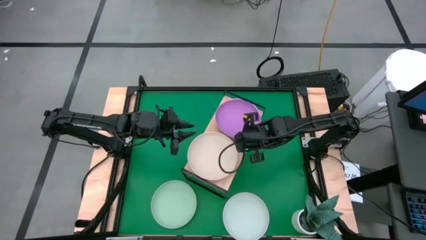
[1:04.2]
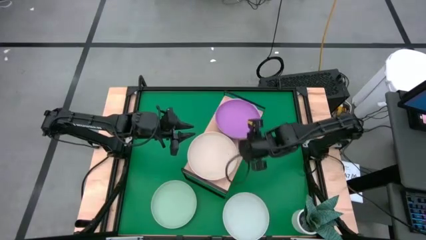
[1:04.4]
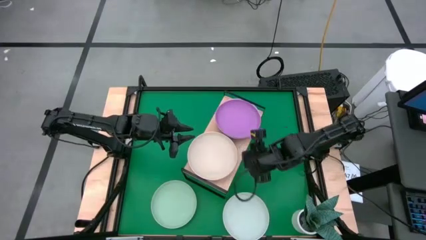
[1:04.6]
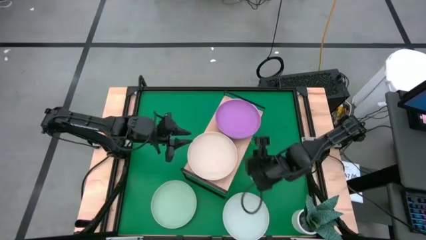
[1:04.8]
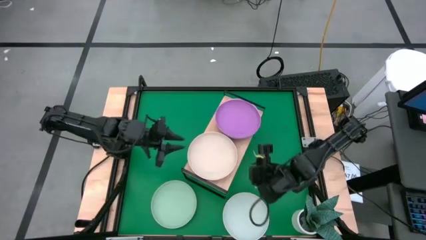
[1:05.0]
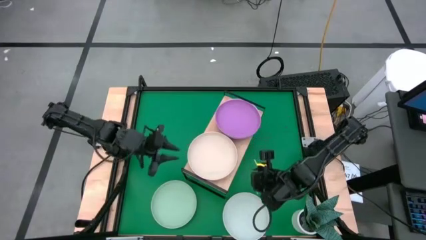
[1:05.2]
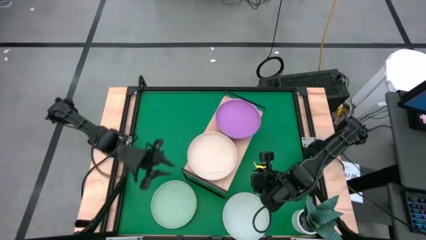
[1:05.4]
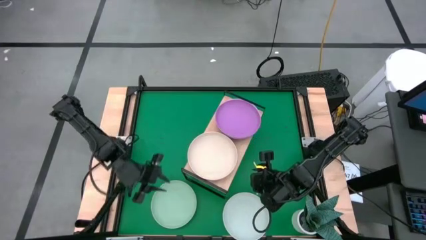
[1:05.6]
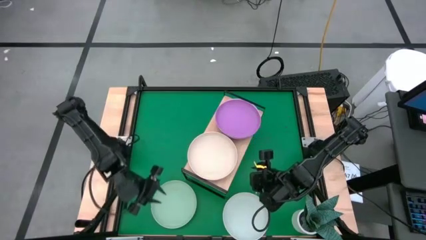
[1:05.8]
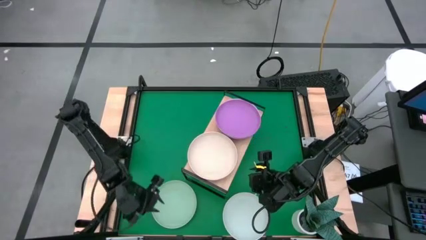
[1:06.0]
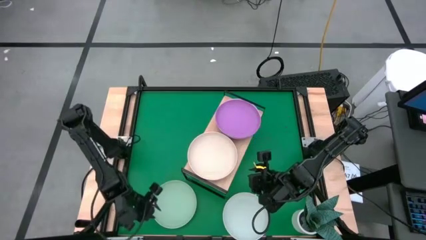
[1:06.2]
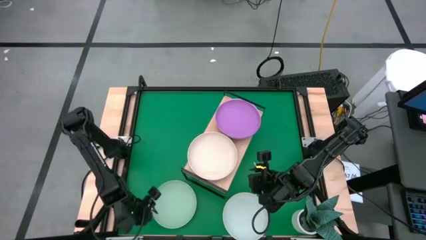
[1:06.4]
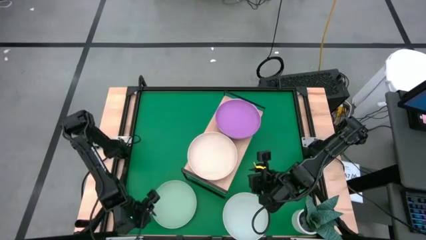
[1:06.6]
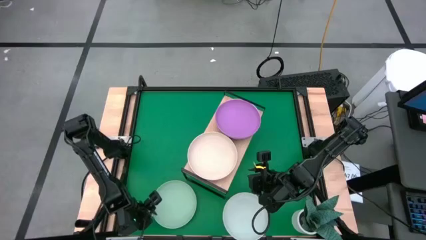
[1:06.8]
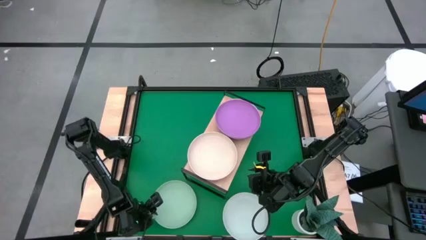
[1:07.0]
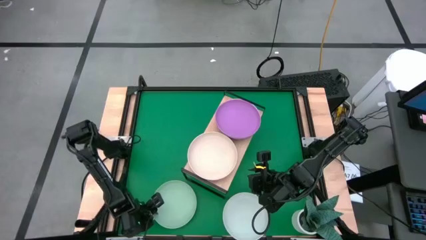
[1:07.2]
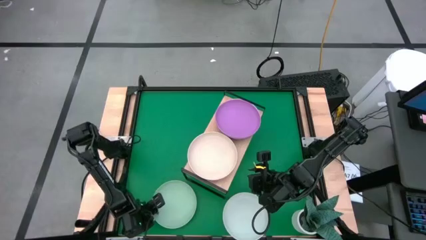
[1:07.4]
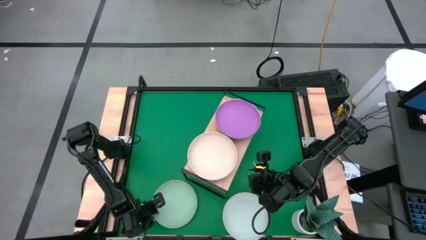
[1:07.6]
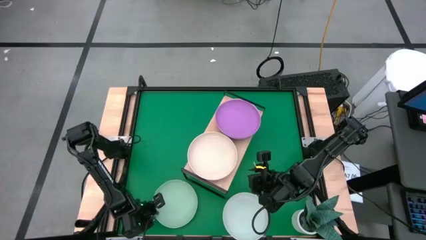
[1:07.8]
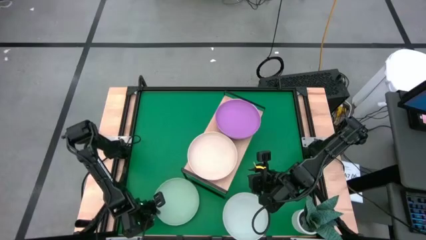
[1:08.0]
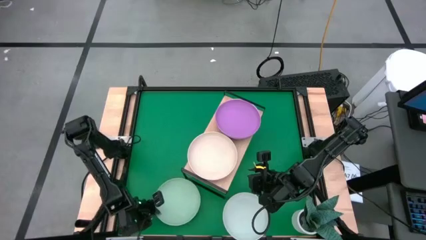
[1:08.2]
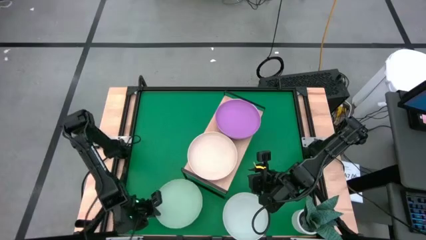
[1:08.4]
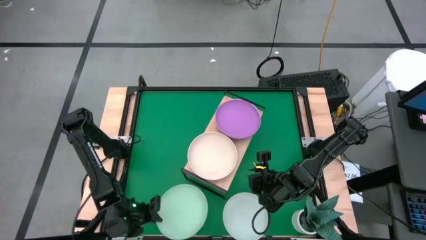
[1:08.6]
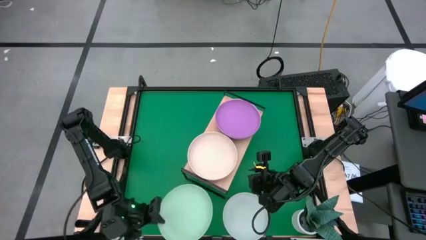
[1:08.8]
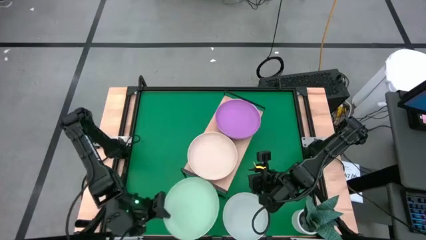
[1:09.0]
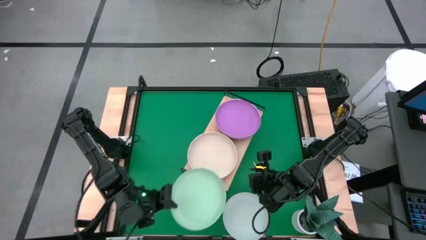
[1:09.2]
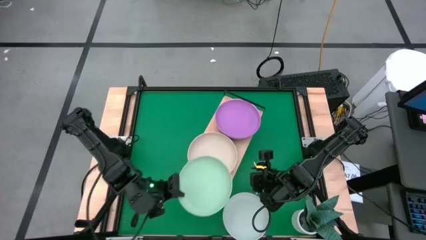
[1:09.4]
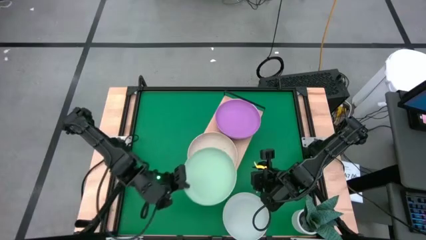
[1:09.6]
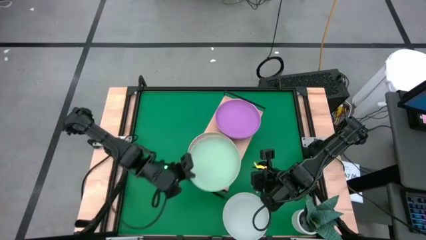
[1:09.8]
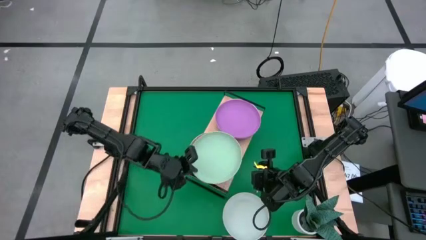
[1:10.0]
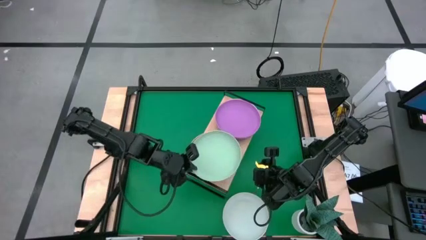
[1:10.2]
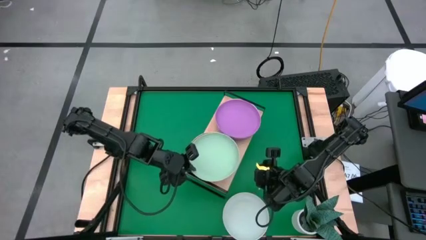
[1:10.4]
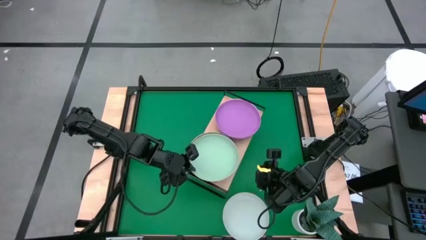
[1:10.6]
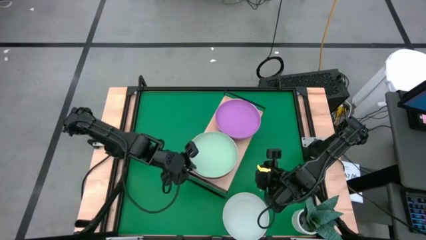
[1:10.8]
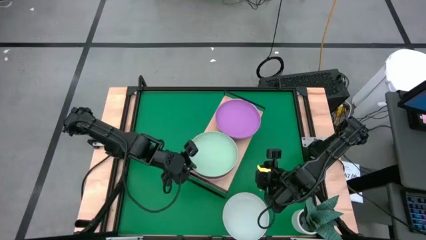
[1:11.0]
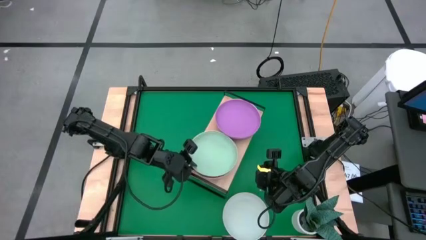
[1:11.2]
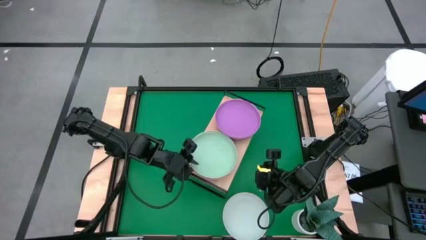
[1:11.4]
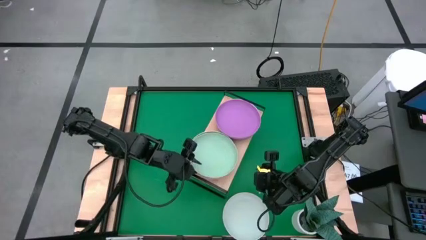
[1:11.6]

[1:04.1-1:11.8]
Task: Place and stack plates onto a shelf
Stack the light green plate on top of the light orange plate on the shelf

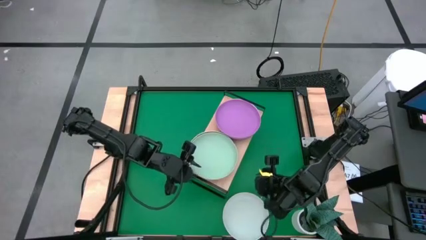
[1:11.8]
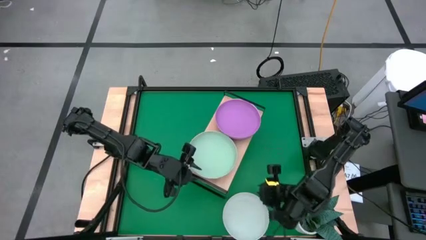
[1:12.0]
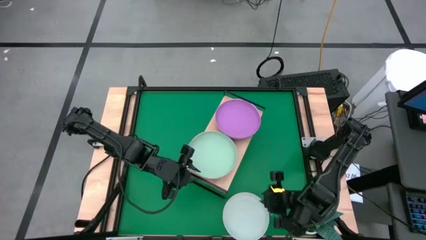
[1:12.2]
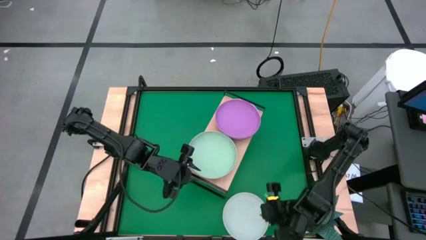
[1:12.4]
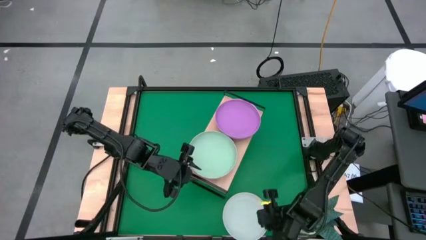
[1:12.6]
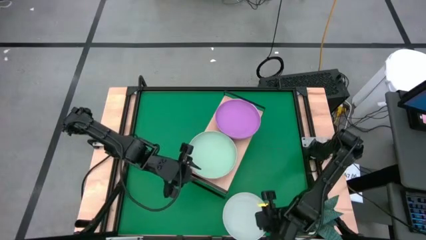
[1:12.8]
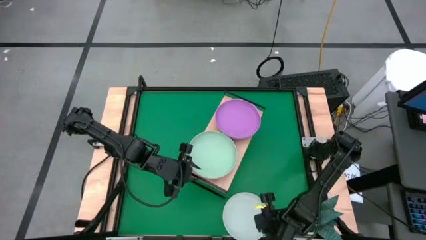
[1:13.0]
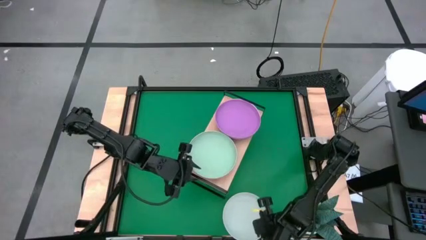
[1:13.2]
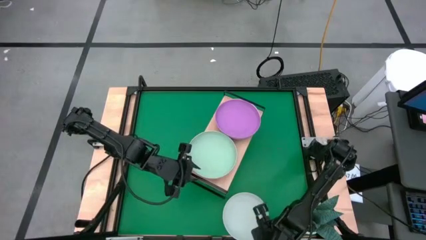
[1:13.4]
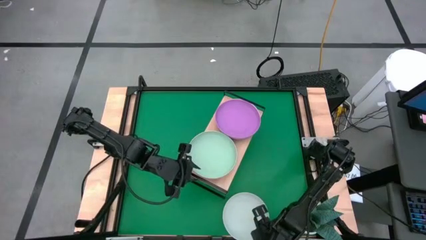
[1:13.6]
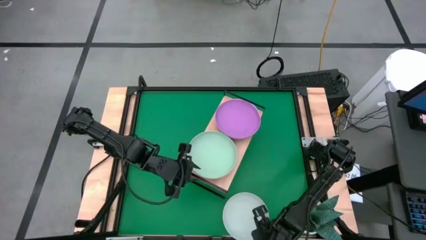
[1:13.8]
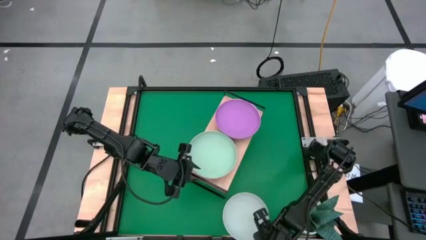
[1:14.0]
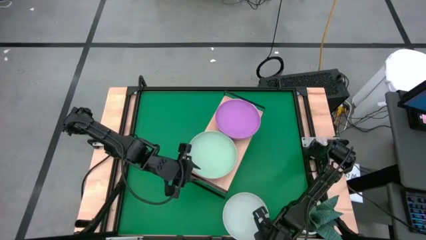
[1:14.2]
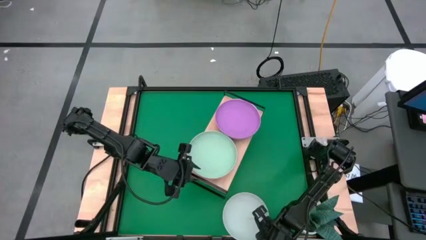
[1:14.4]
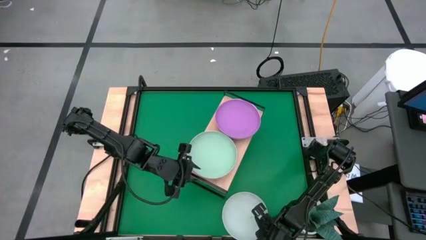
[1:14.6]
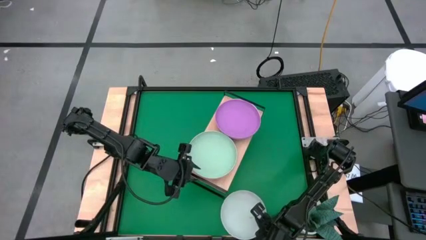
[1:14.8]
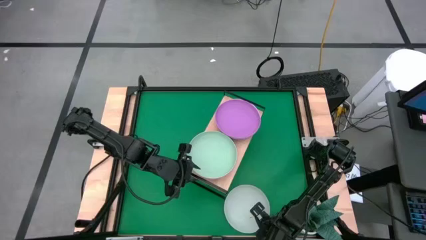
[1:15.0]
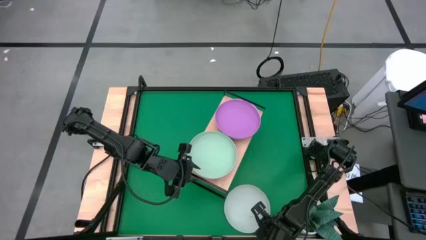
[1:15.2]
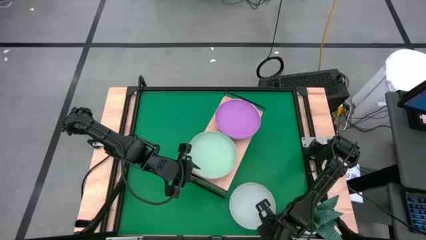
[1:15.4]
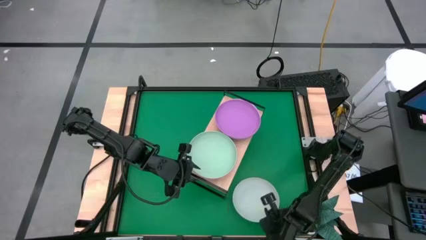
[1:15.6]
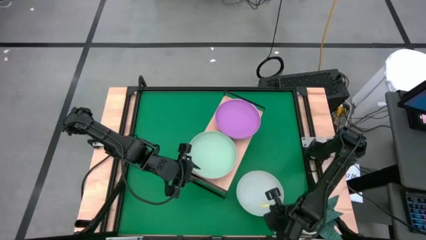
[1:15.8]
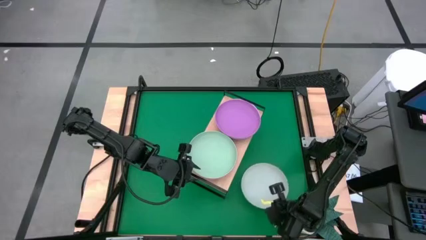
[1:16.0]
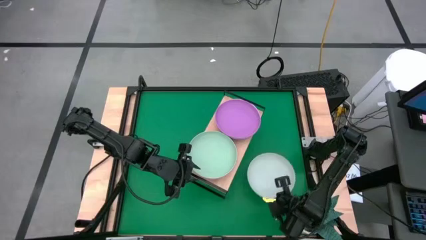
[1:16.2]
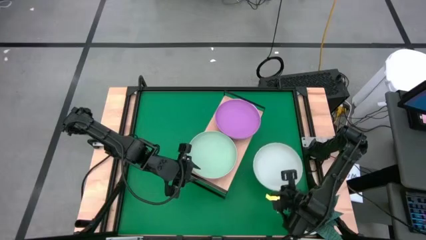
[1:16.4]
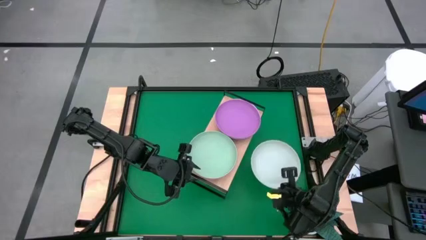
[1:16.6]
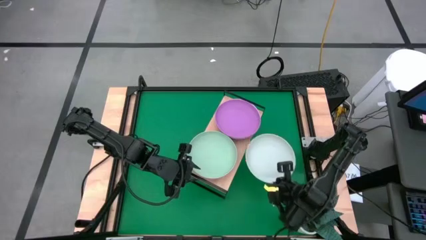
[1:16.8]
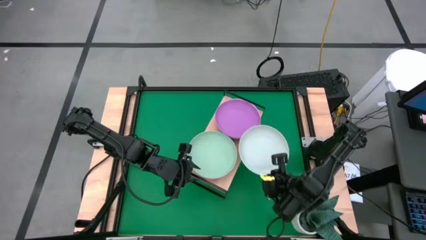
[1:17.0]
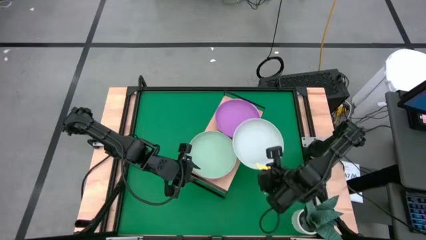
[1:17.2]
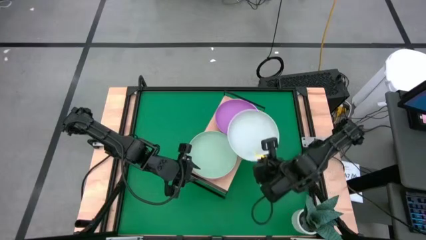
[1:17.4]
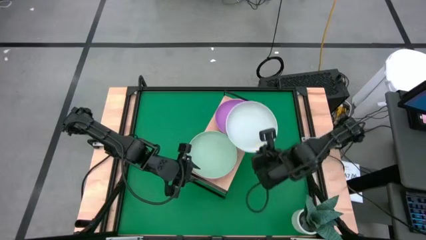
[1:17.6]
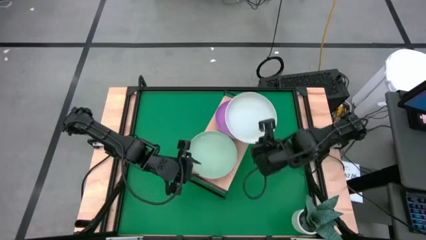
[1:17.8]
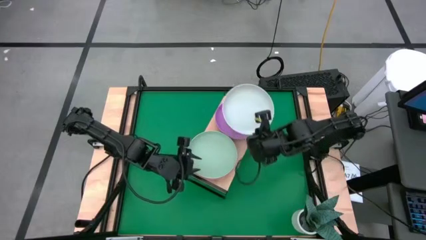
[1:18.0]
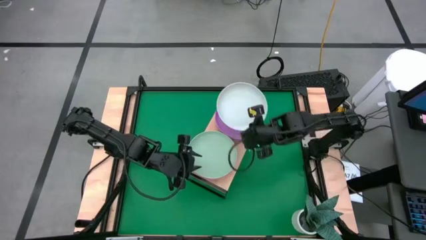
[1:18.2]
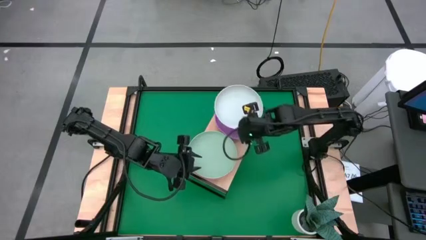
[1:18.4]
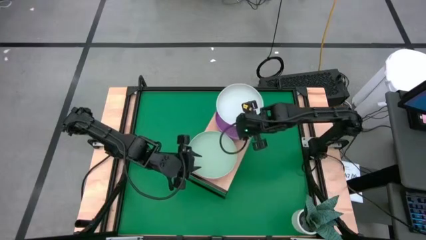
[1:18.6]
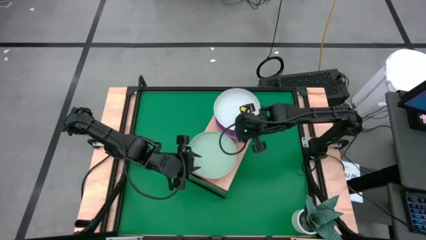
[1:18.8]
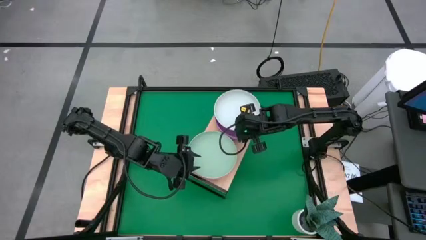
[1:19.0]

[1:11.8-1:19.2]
Stack the white plate on top of the purple plate on the shelf
